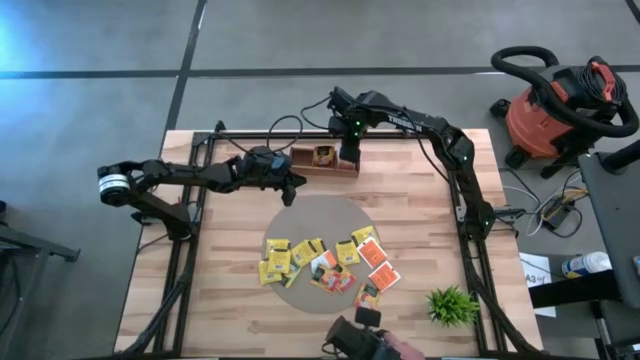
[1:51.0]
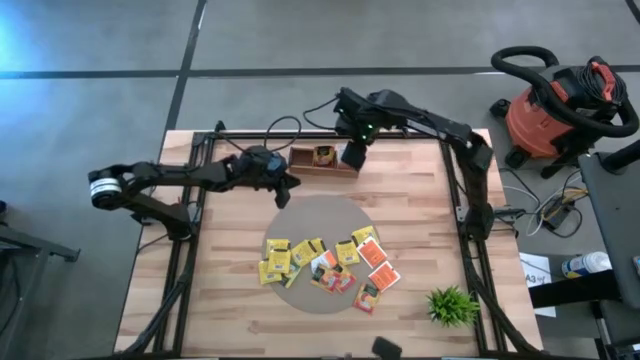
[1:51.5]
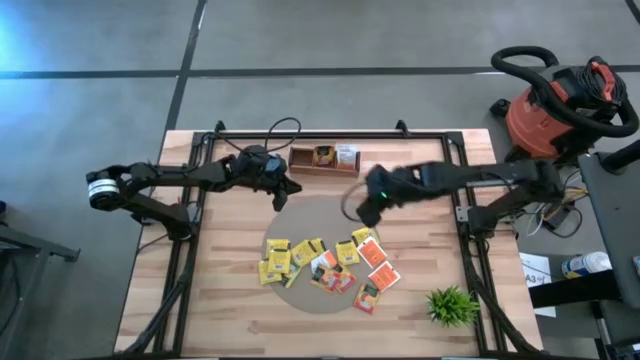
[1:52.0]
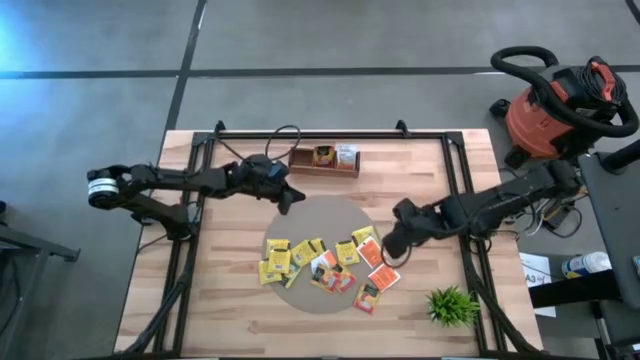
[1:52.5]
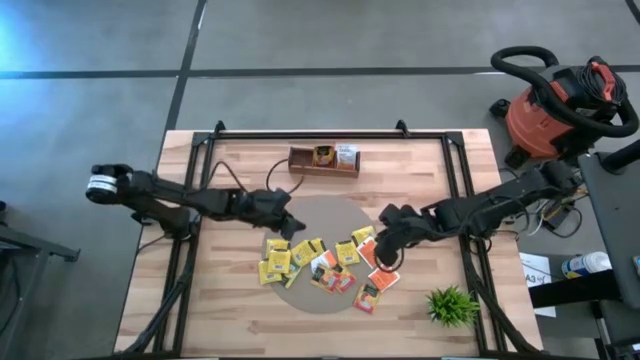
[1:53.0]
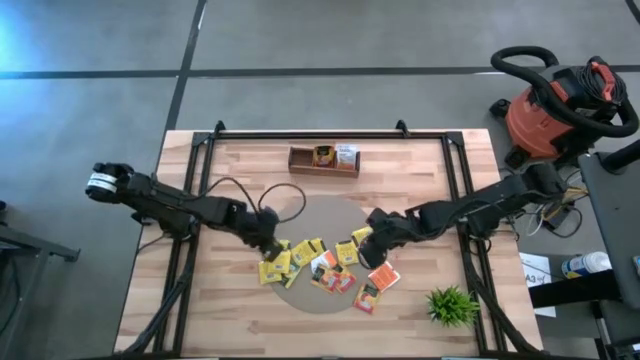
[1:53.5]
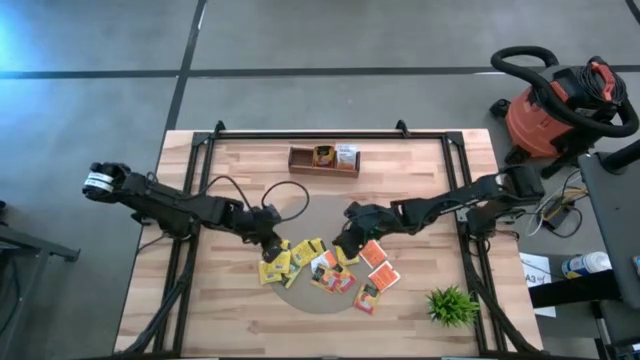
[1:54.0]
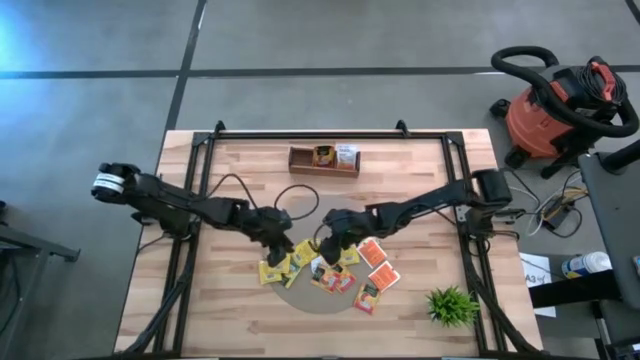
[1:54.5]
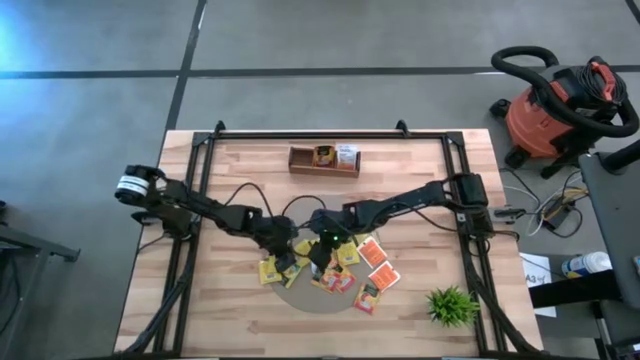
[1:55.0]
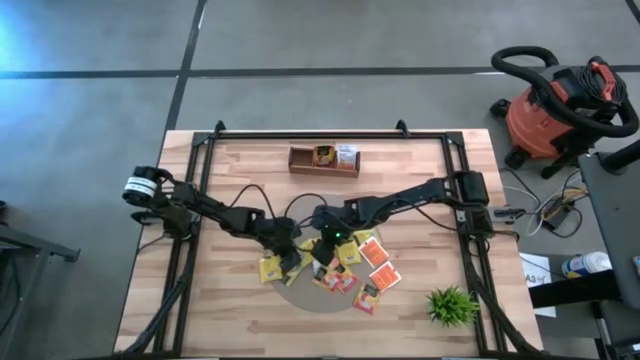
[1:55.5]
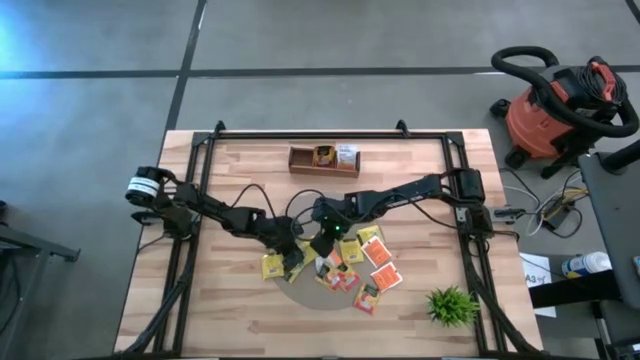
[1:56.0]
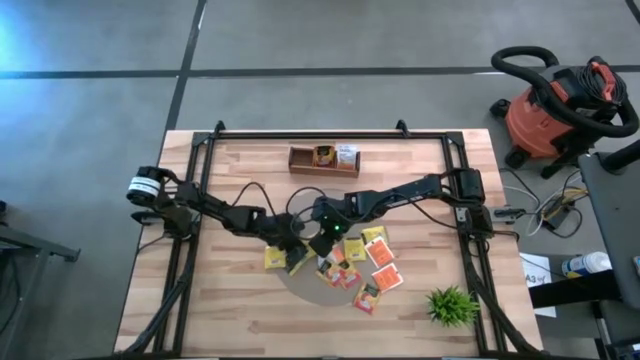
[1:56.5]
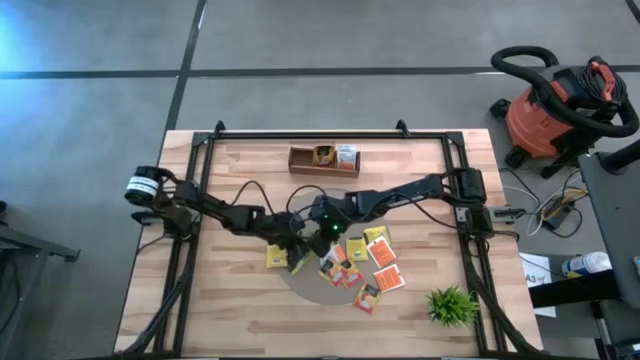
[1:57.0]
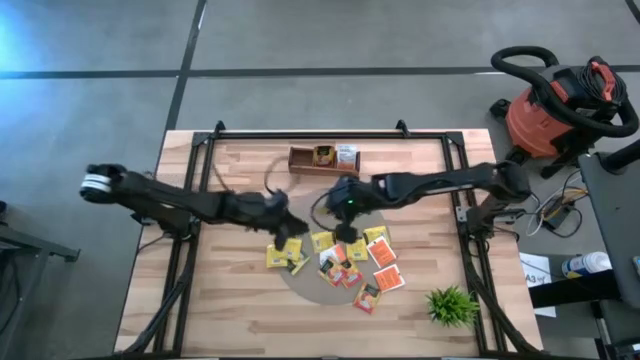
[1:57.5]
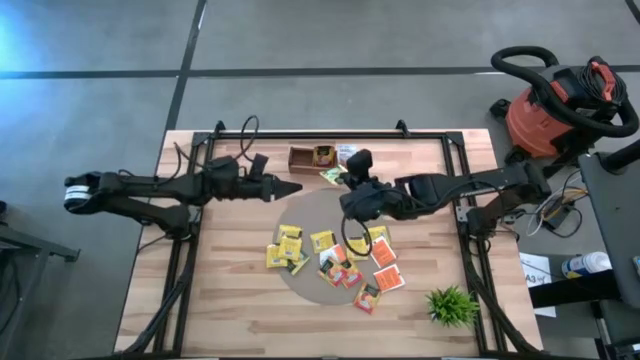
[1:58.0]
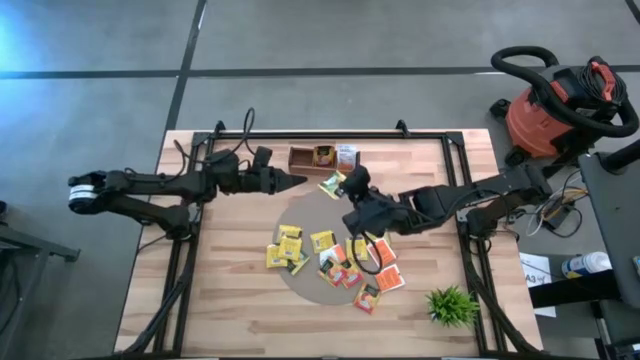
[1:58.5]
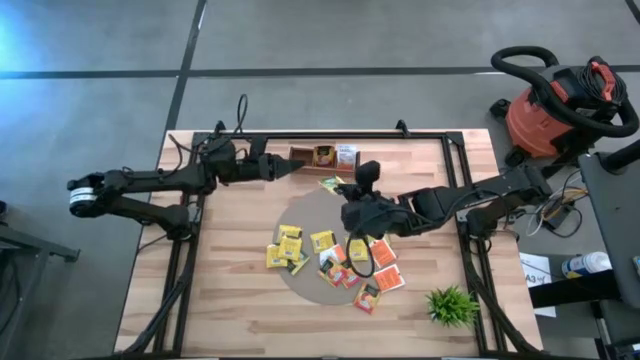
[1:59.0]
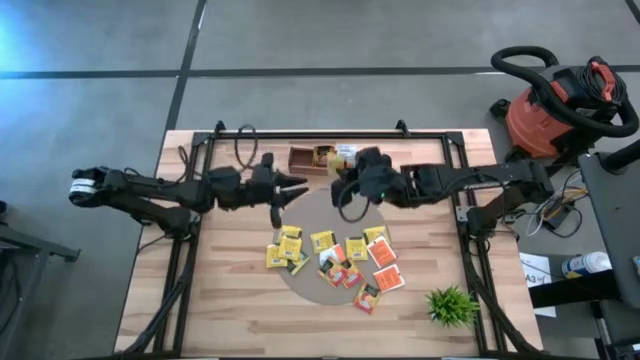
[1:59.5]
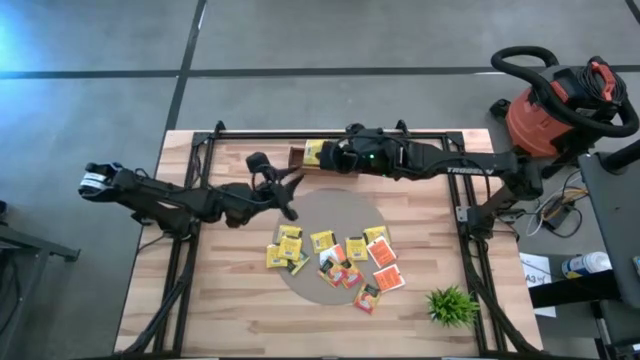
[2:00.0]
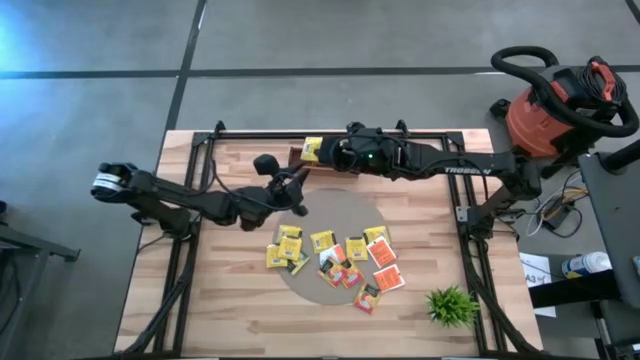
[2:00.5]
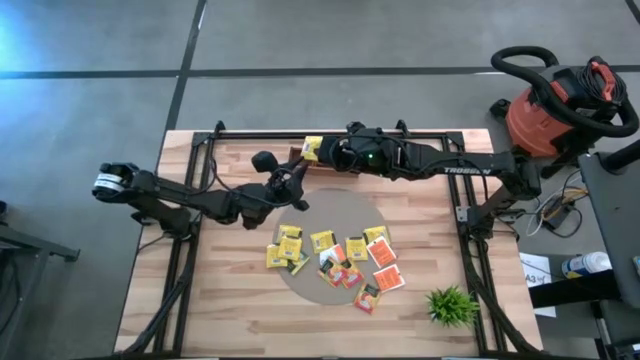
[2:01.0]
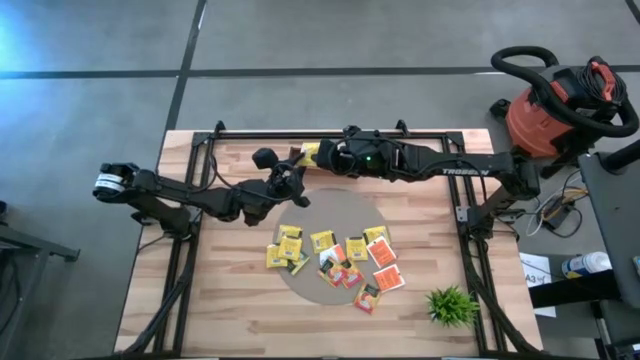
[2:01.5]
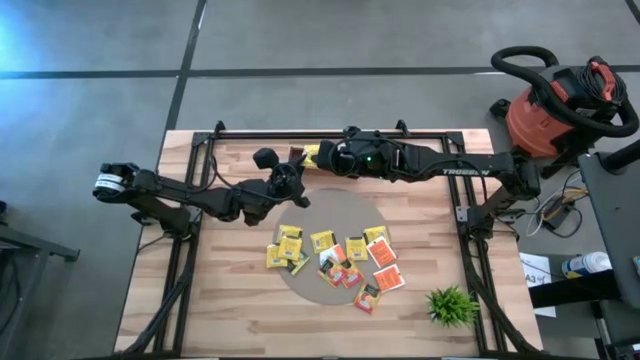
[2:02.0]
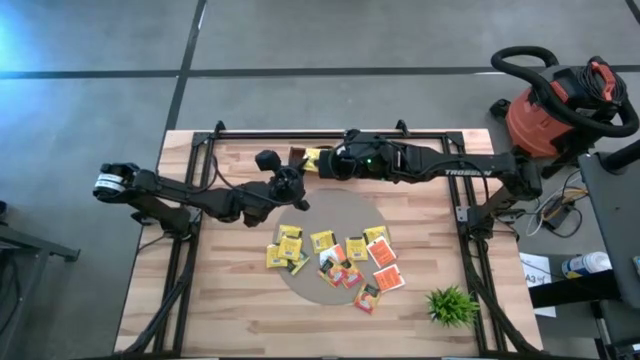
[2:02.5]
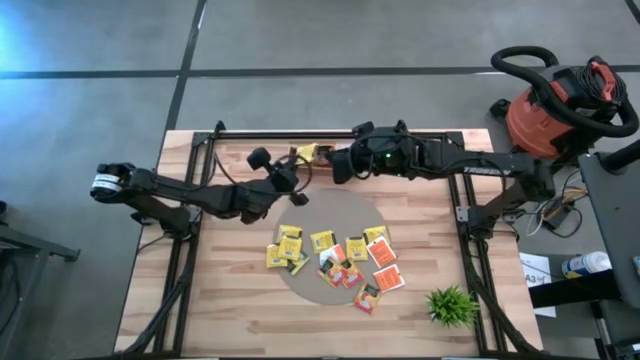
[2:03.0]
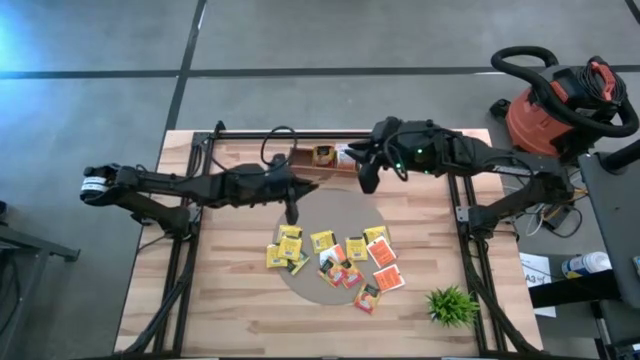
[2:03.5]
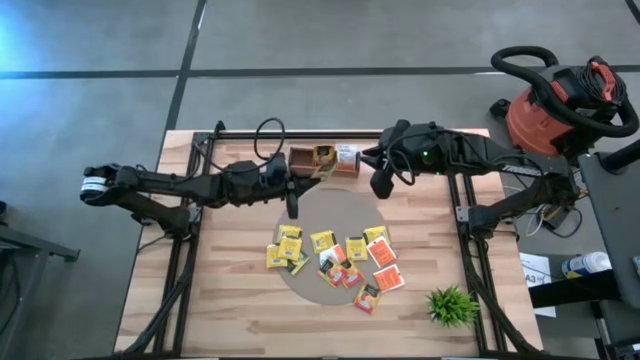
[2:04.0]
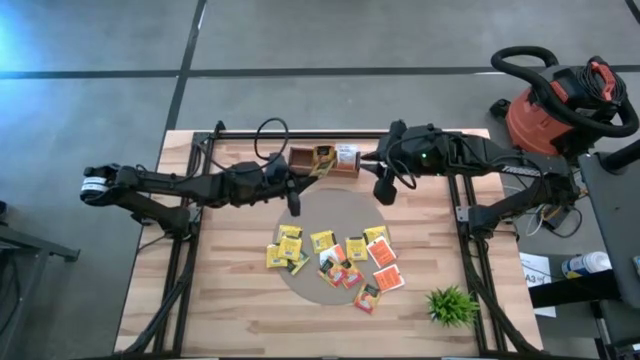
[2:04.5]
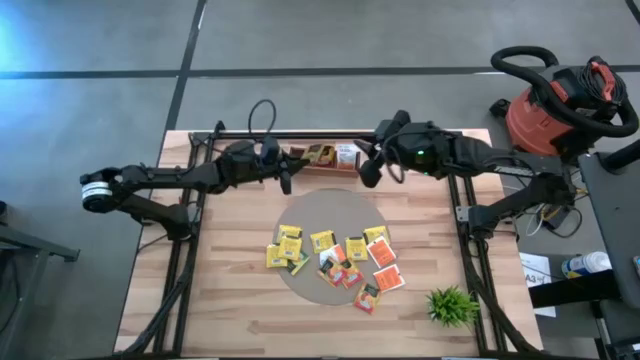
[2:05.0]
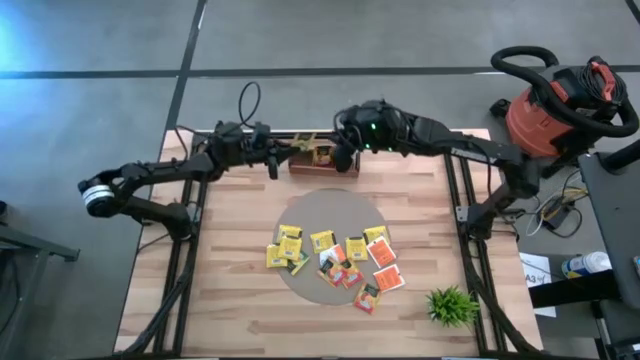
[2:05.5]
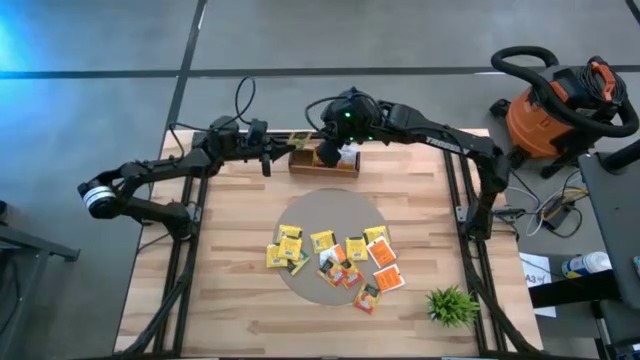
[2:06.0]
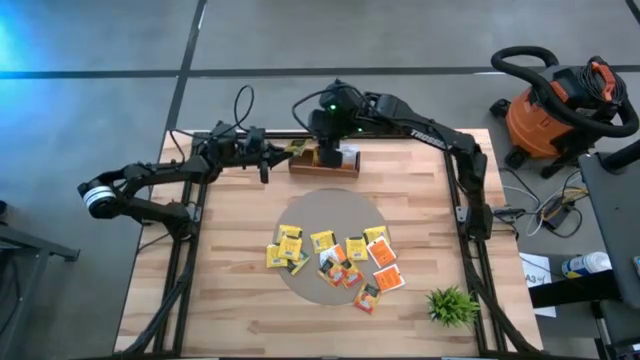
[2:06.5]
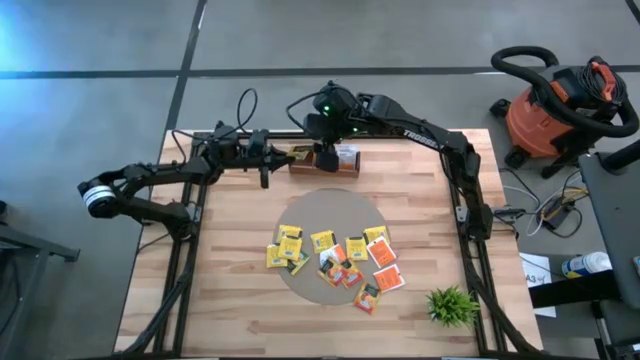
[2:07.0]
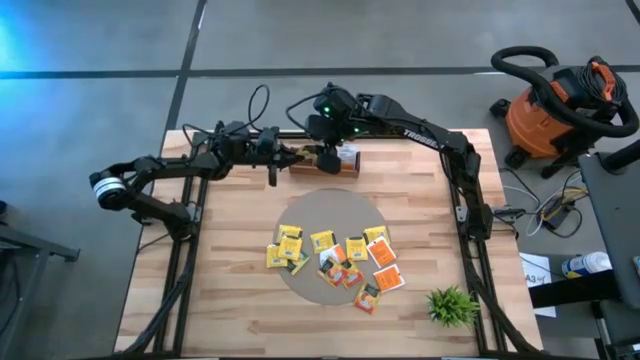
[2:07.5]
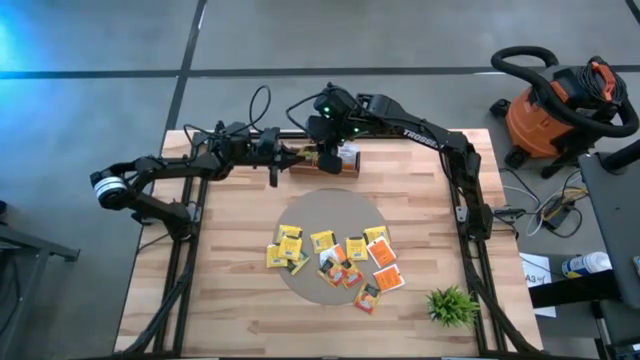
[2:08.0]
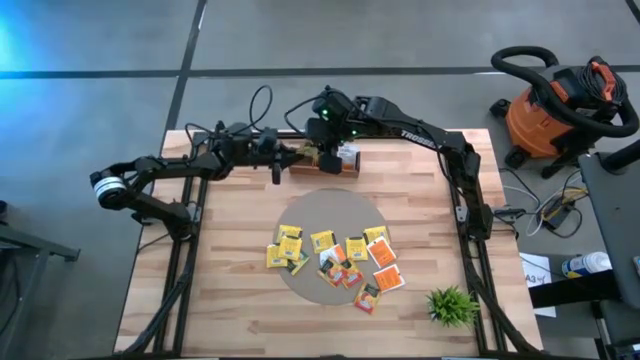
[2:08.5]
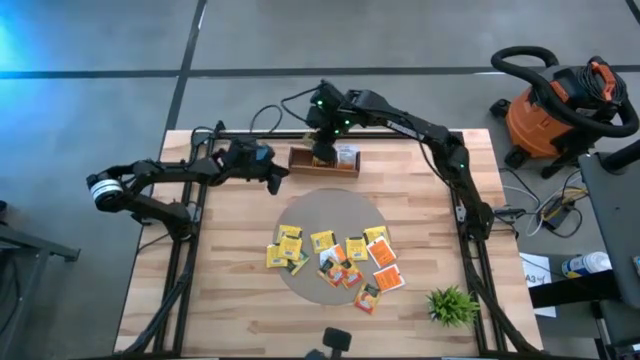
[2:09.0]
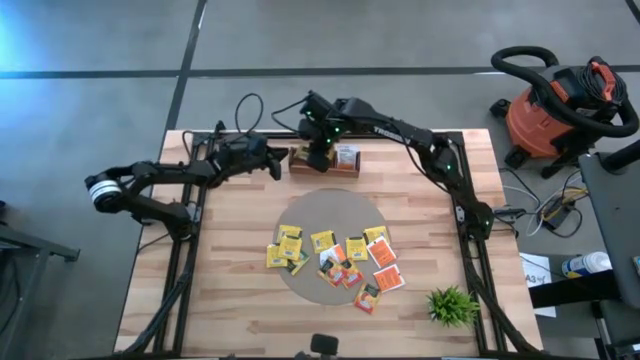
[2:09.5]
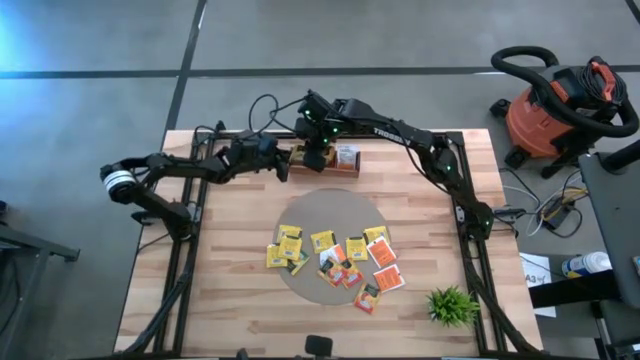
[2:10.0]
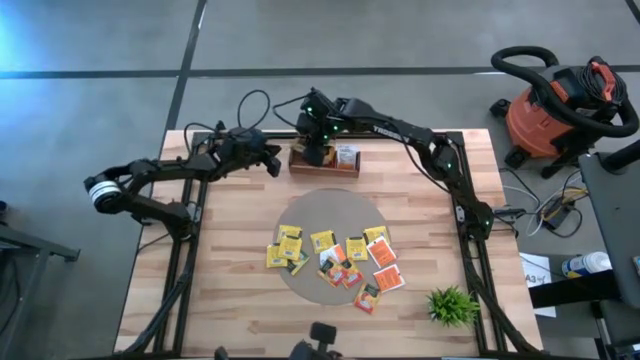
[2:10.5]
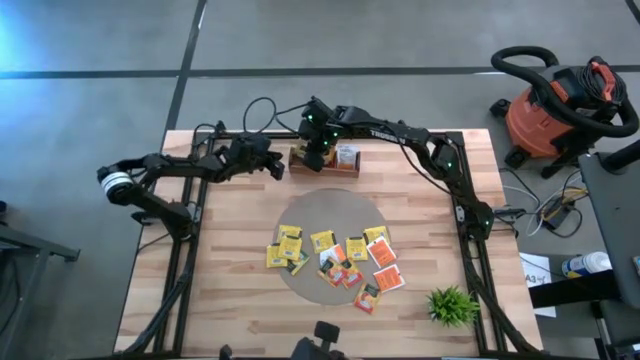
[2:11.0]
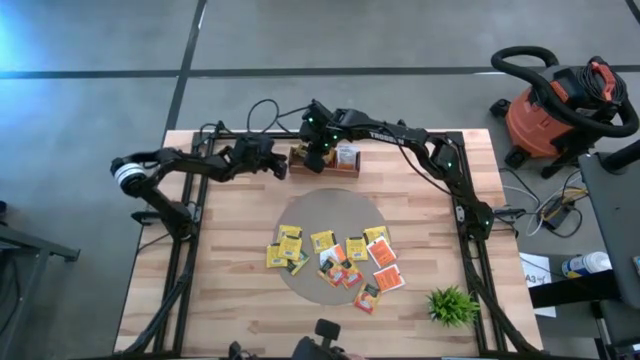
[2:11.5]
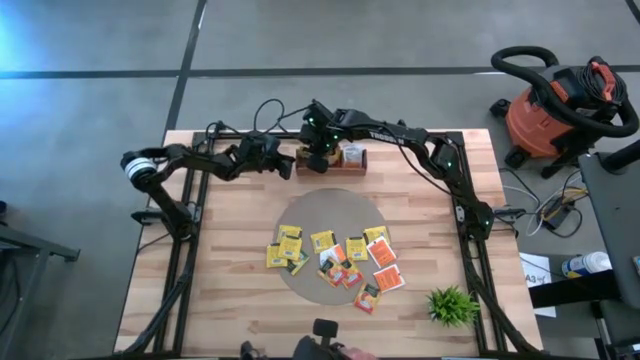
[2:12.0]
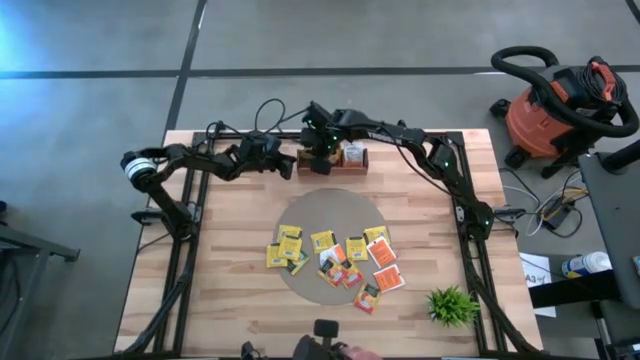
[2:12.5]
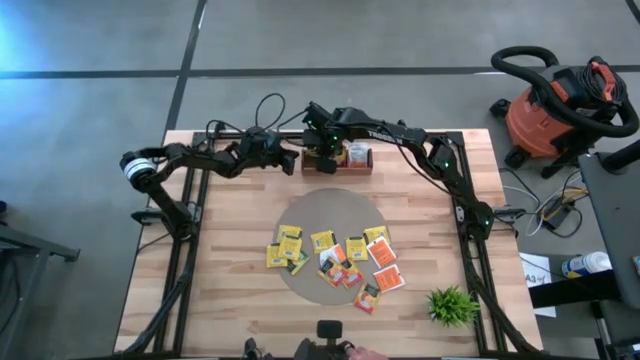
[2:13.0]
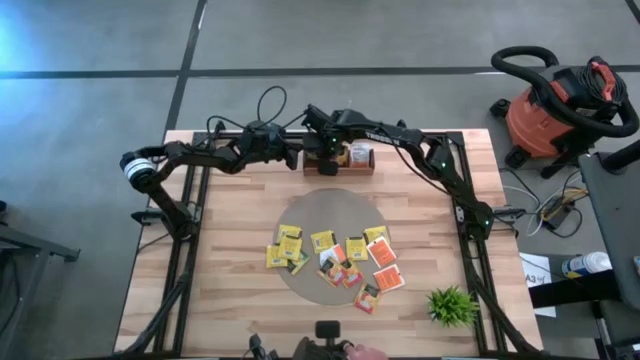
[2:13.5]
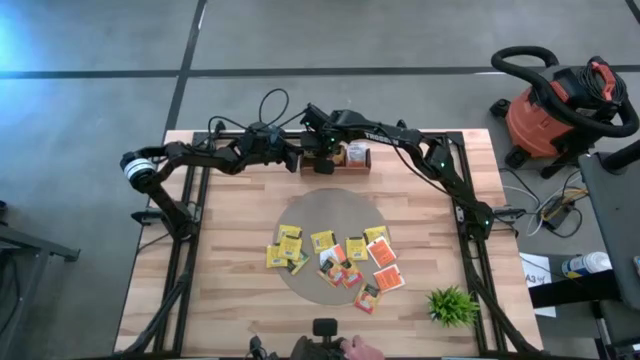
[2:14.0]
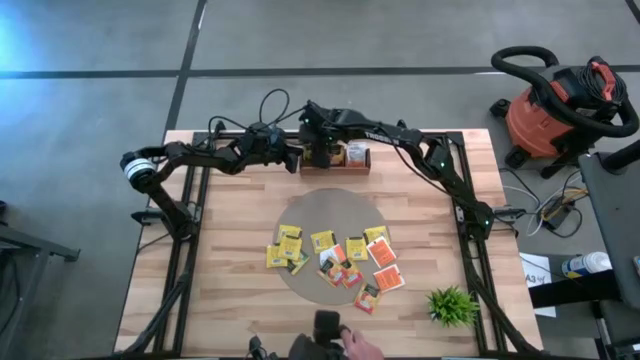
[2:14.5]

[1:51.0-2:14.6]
Task: Pick & Place Tea
Put the yellow tea bag into the left compartment of the wooden organizer
